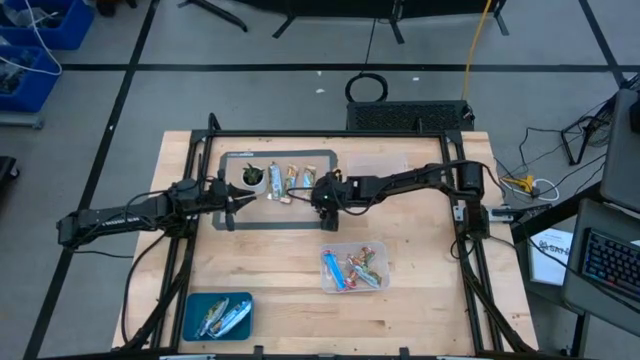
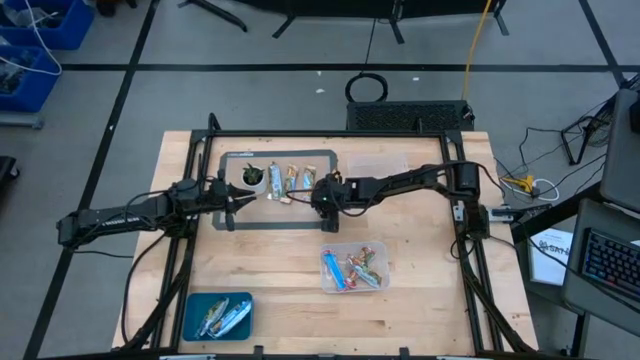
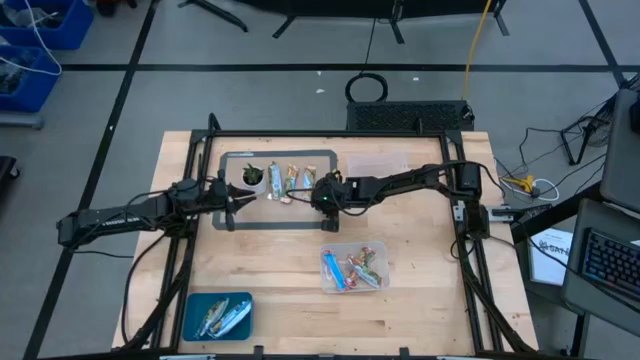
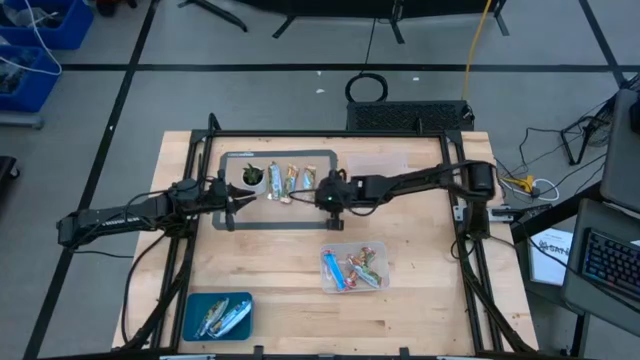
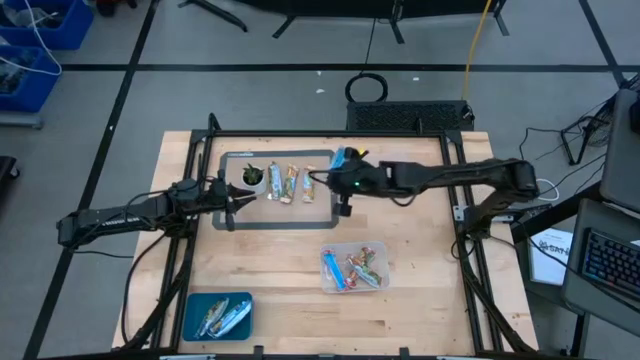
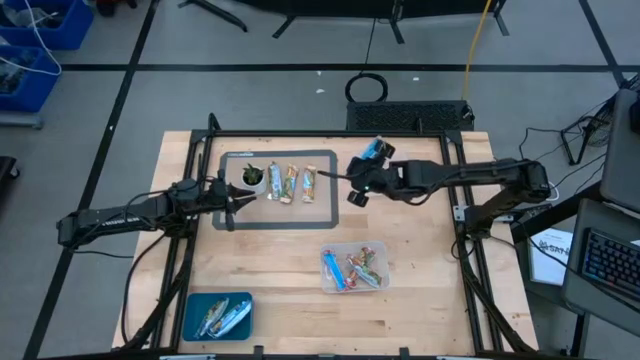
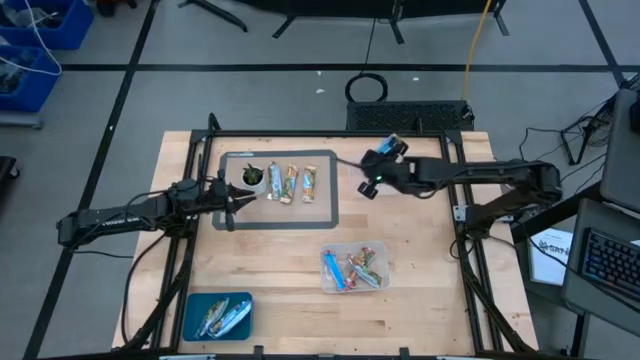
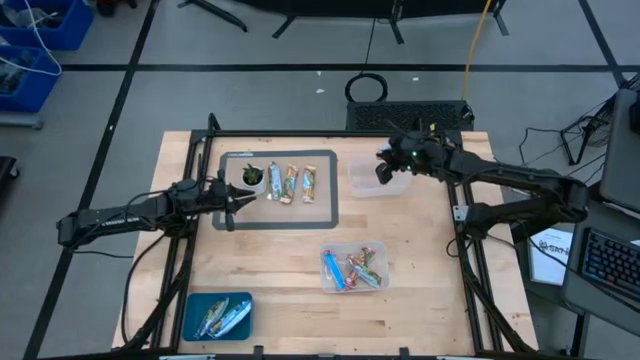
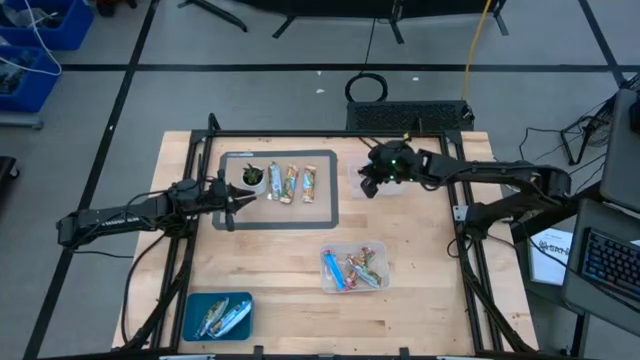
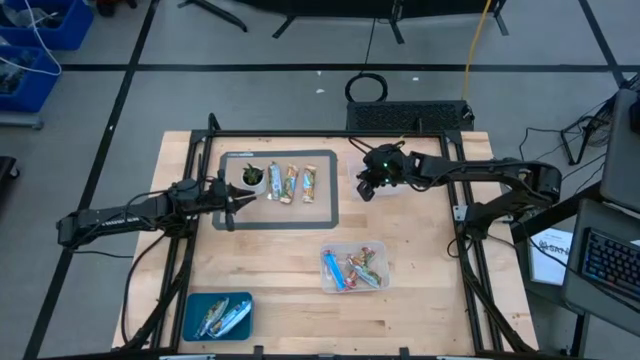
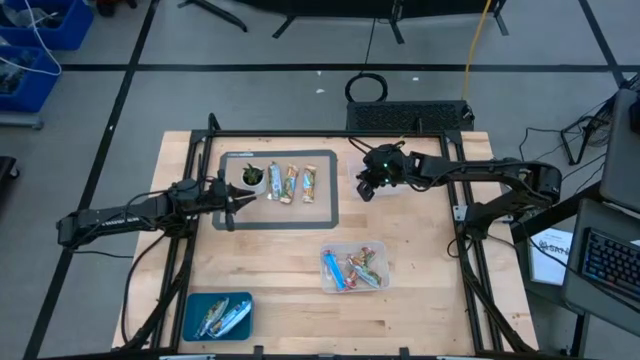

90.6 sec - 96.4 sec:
Task: Pick and place Granola Bars by type
Put the yellow granola bar into the top transparent bin

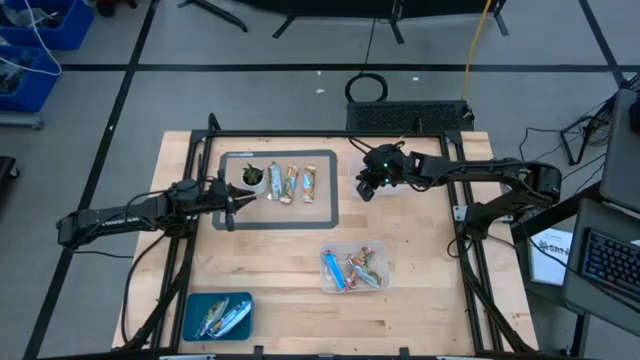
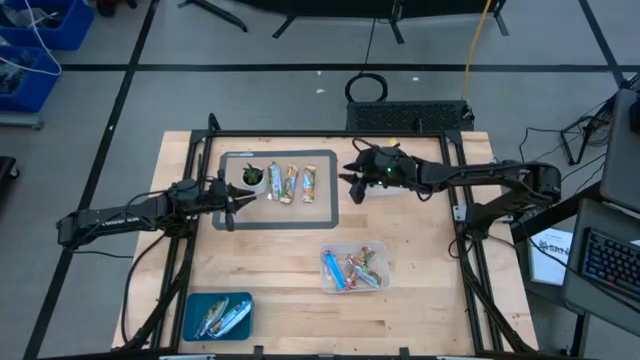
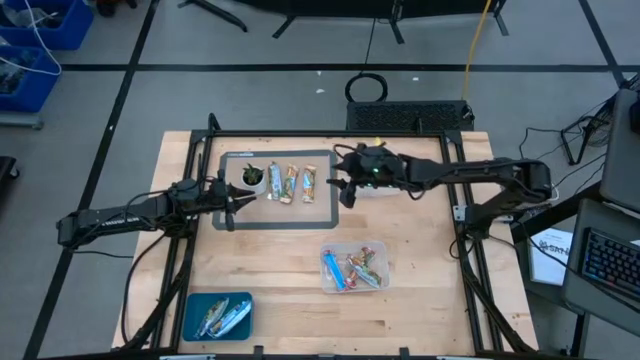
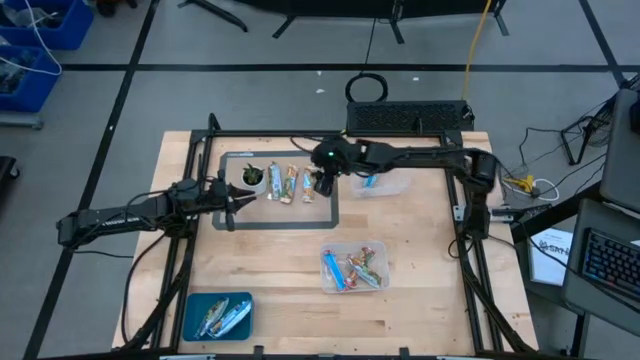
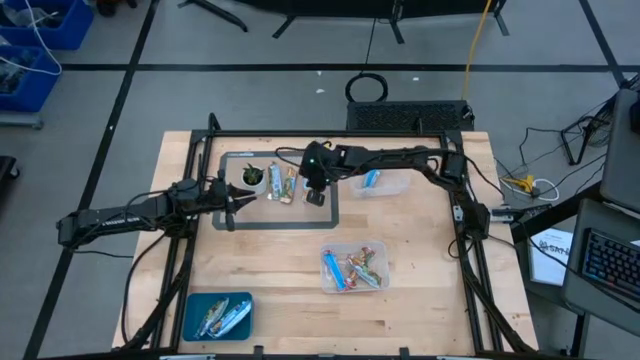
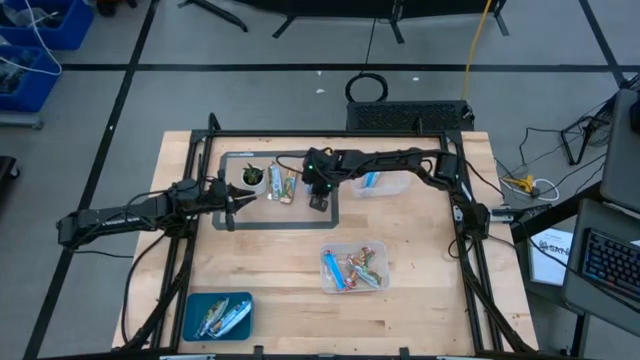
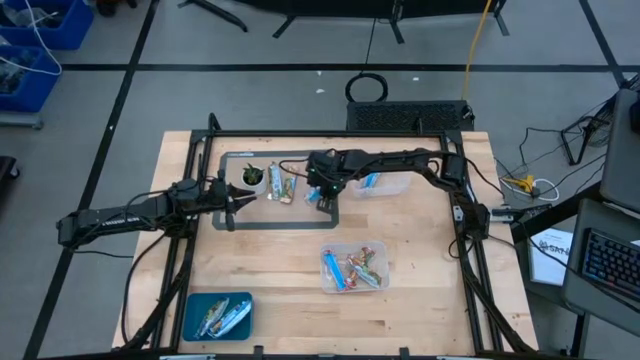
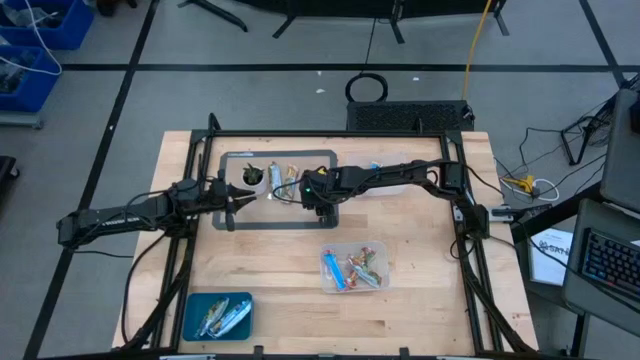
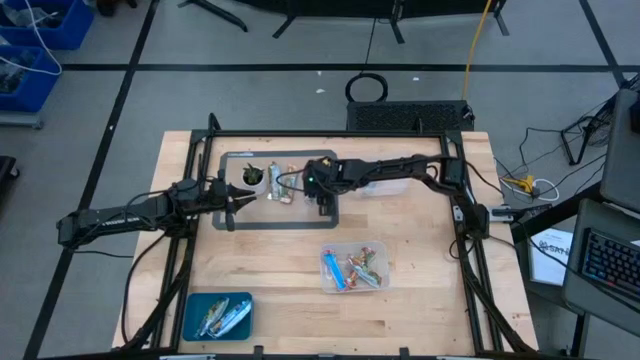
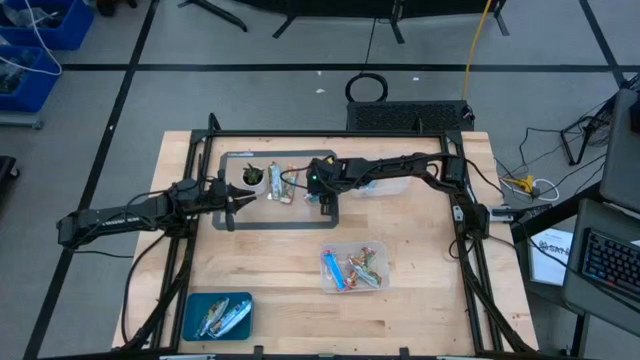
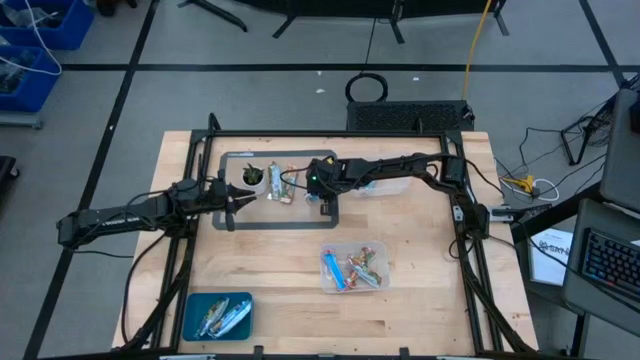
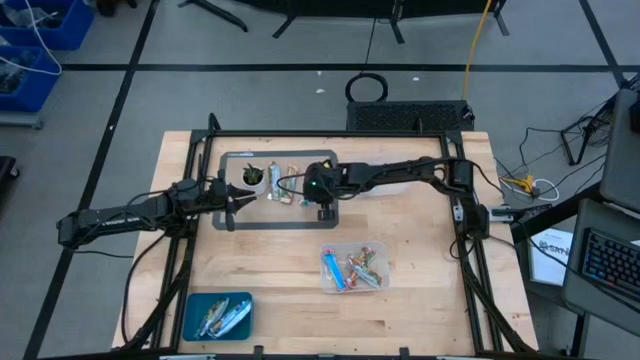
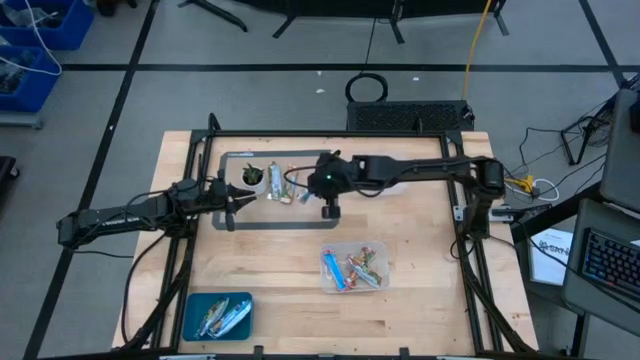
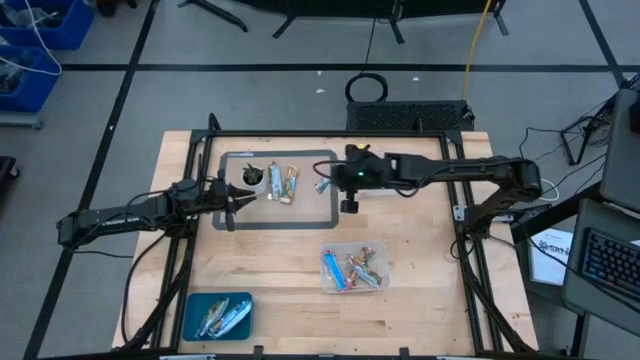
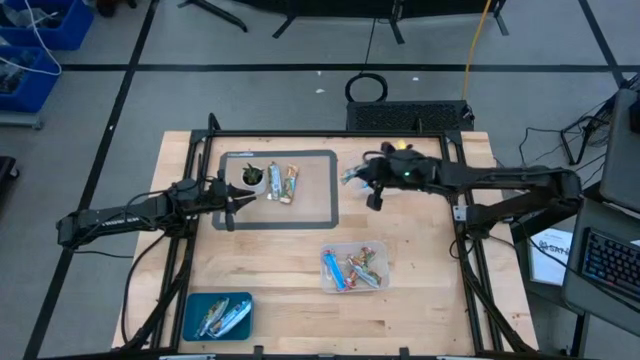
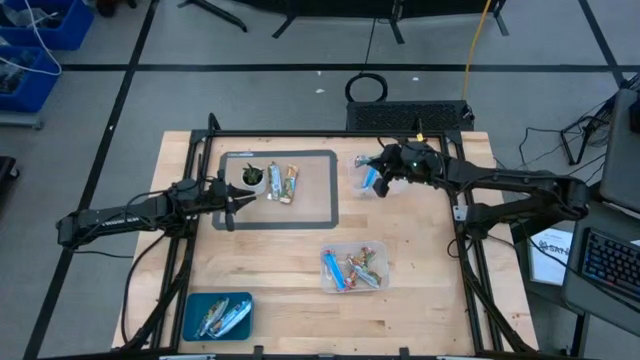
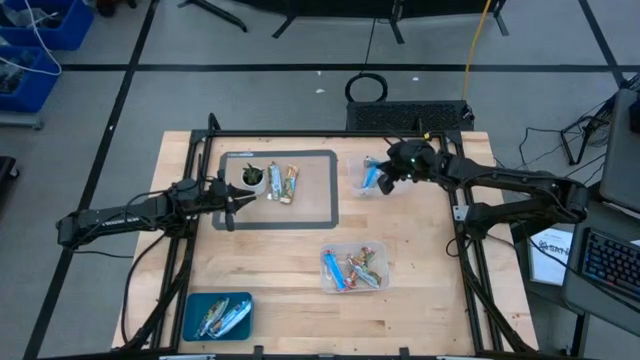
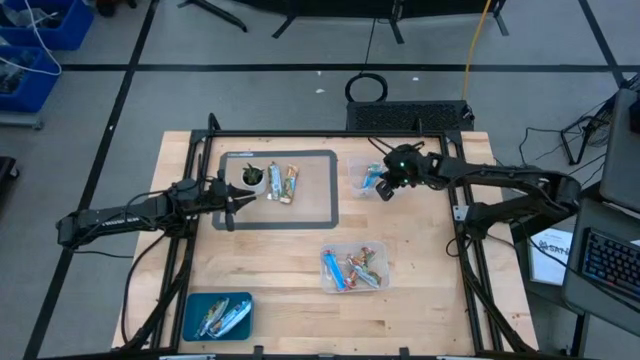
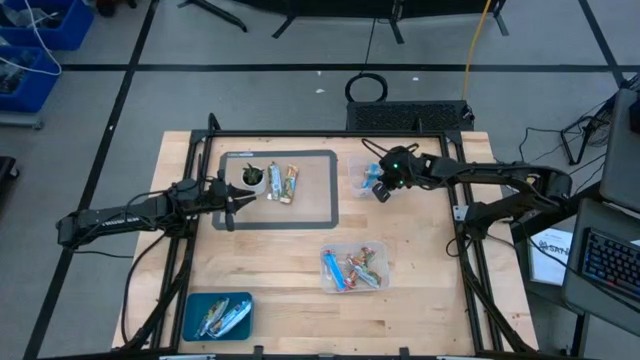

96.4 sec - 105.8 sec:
Put the yellow granola bar into the top transparent bin

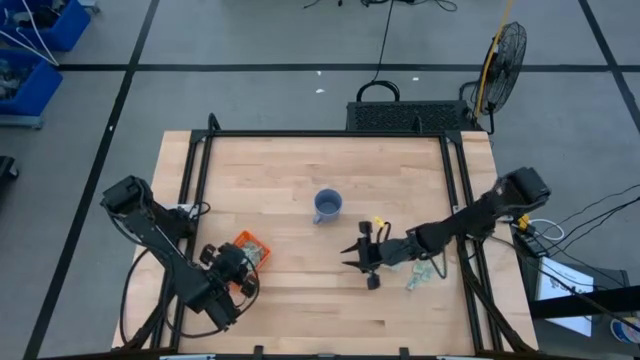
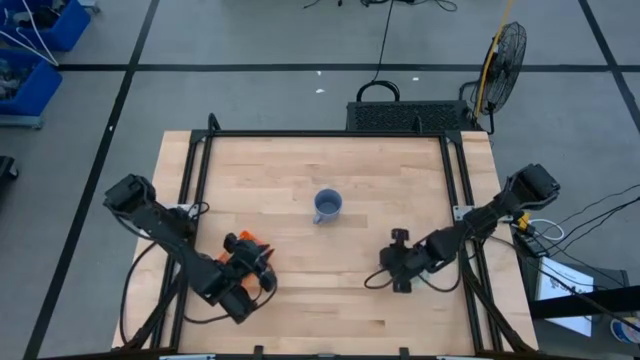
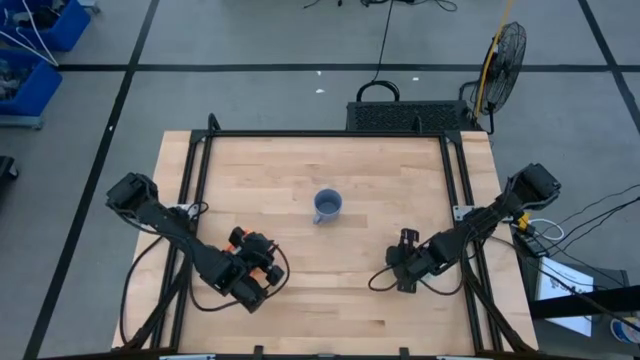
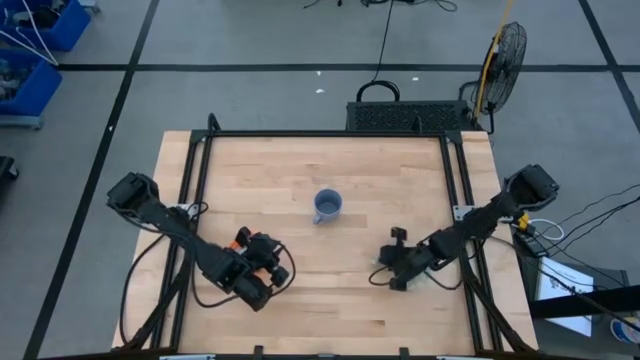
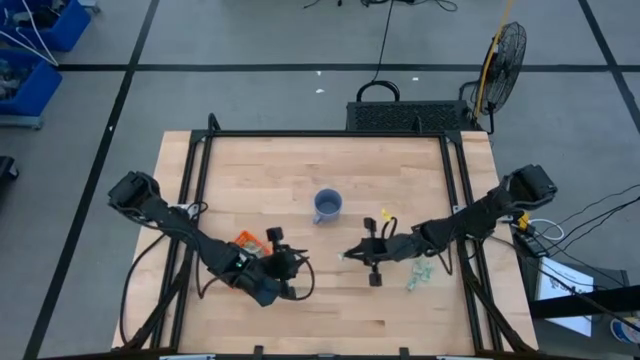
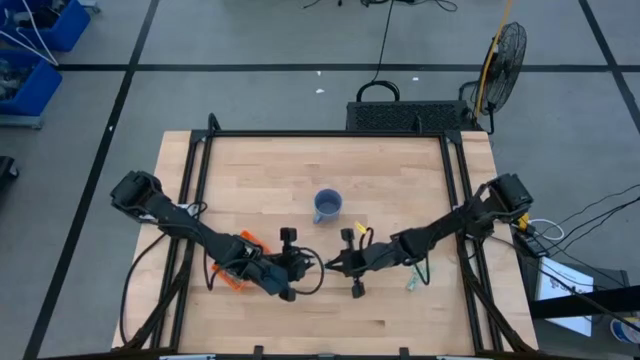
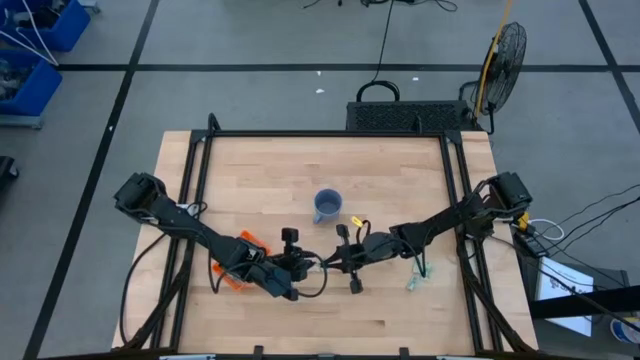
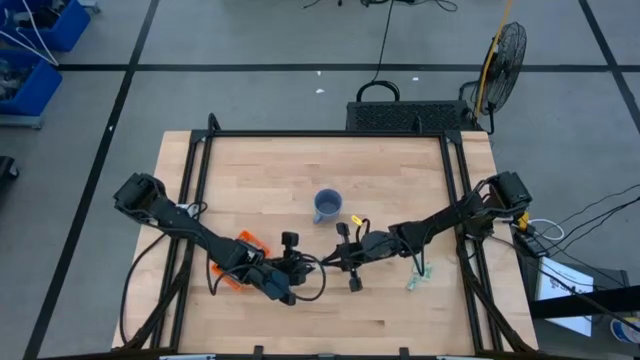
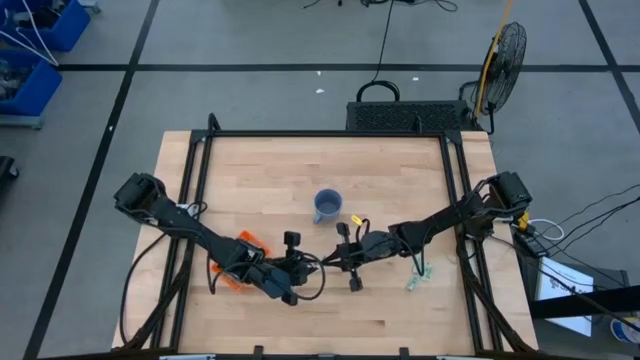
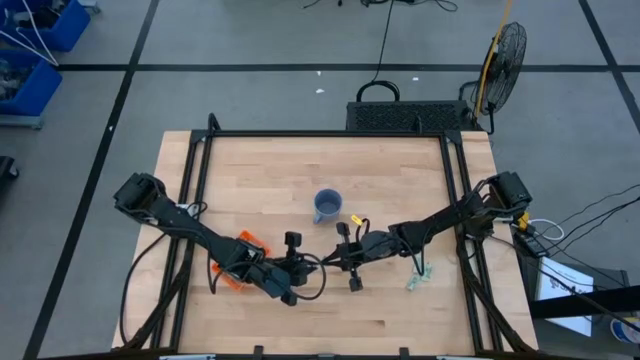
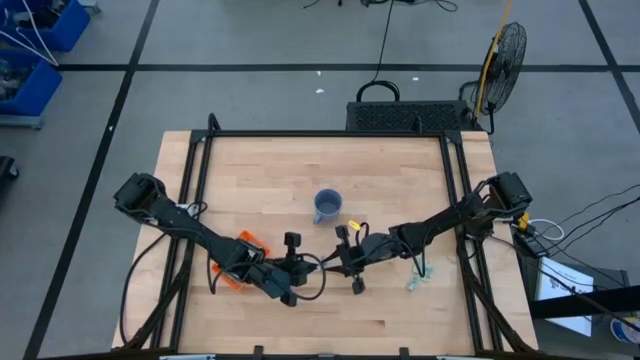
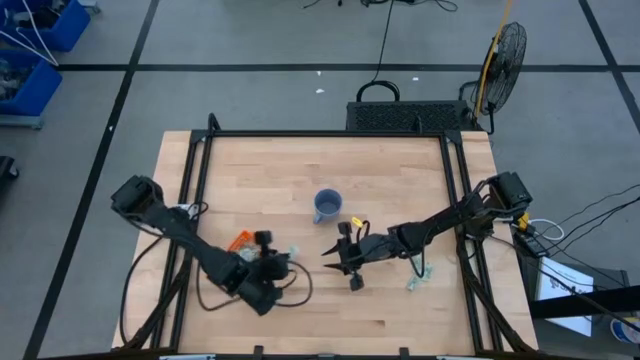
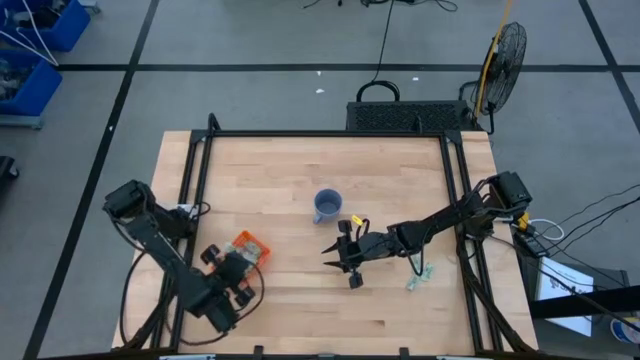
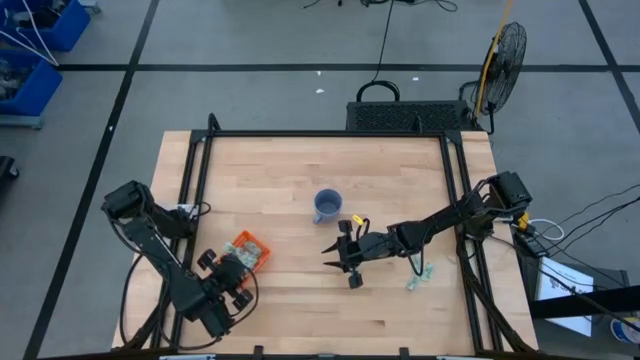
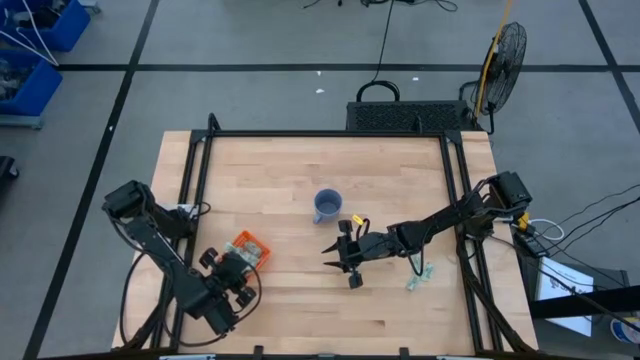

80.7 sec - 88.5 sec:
Task: Pick and place Stevia / Truvia into bins
Put the green stevia packet into the orange basket
